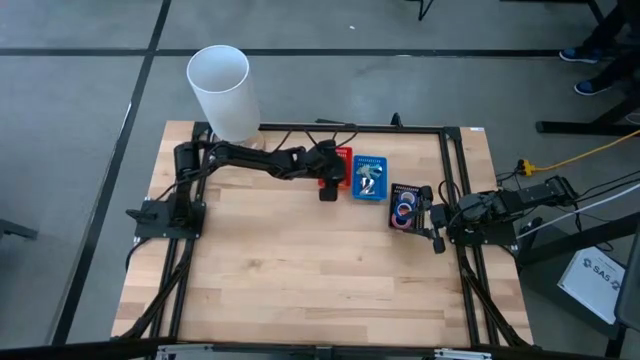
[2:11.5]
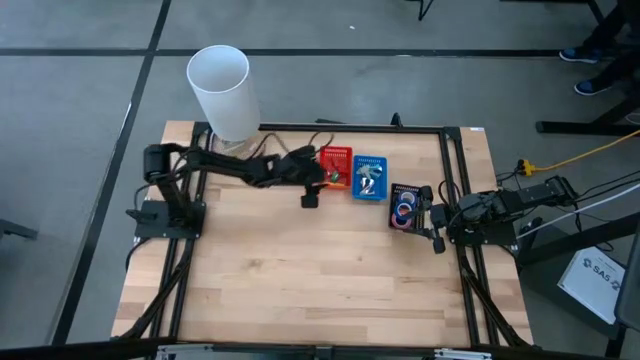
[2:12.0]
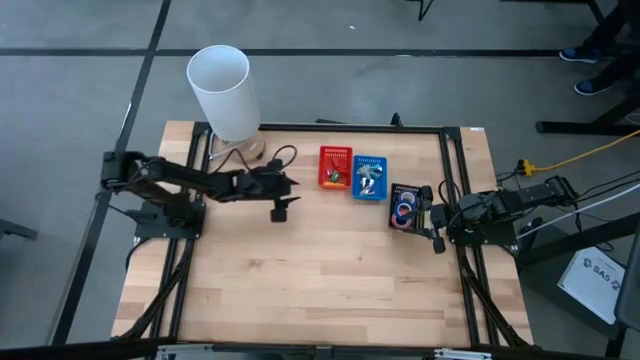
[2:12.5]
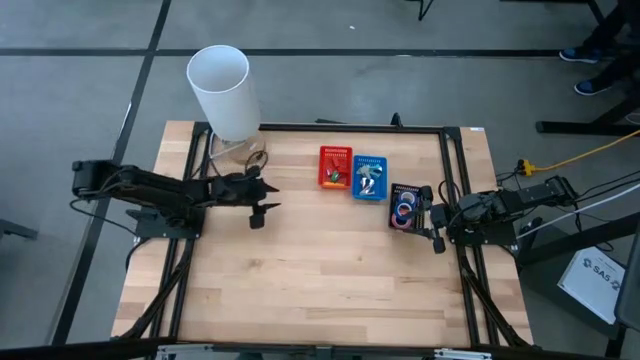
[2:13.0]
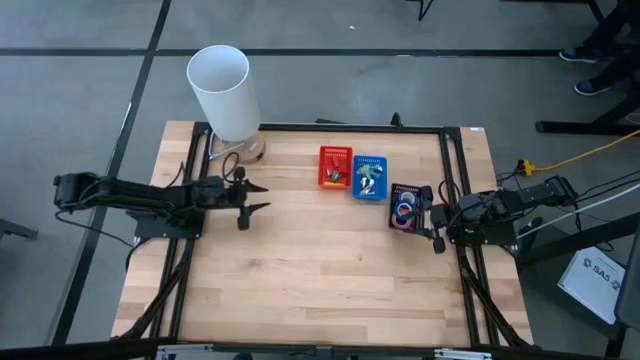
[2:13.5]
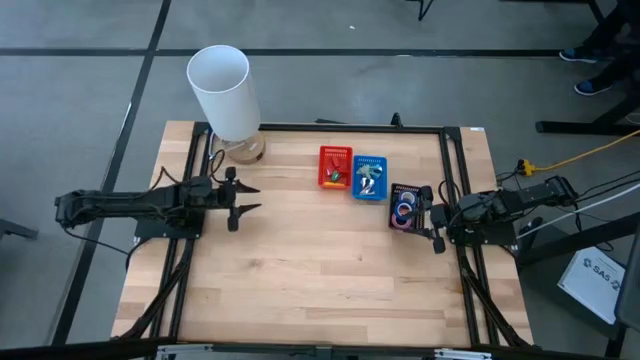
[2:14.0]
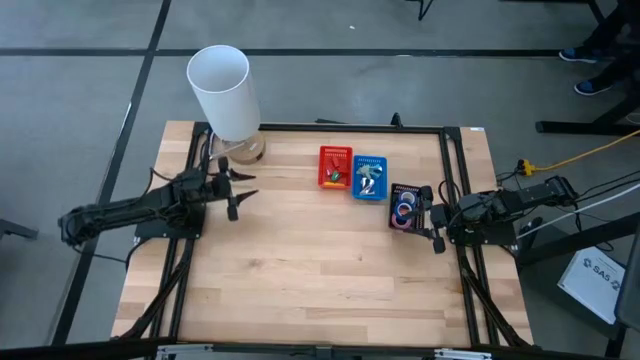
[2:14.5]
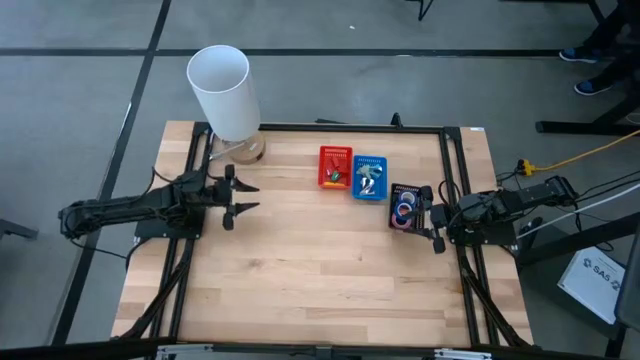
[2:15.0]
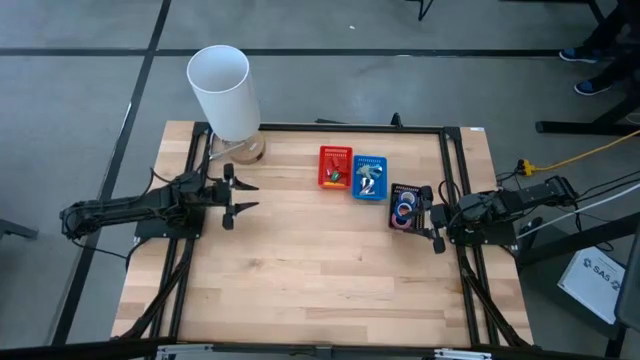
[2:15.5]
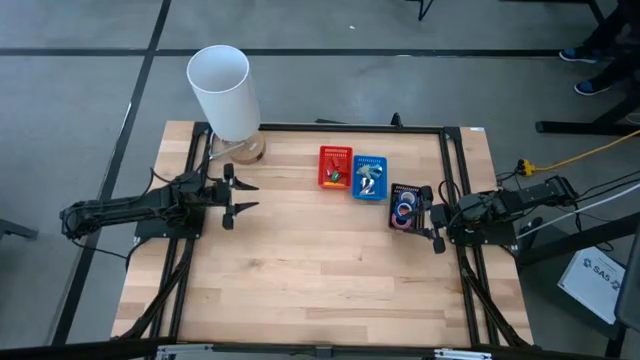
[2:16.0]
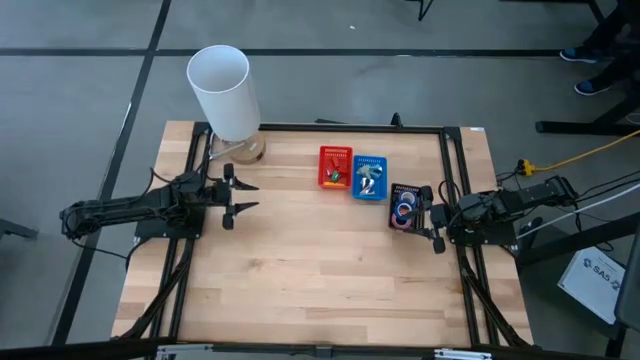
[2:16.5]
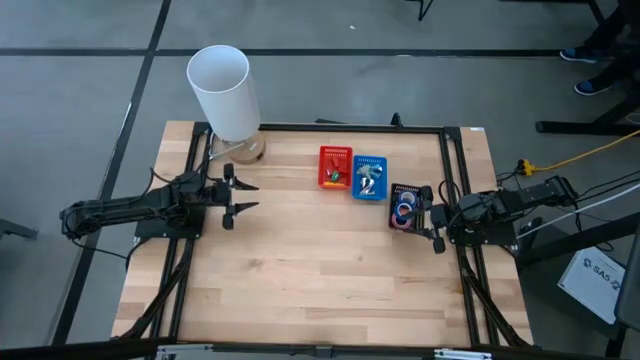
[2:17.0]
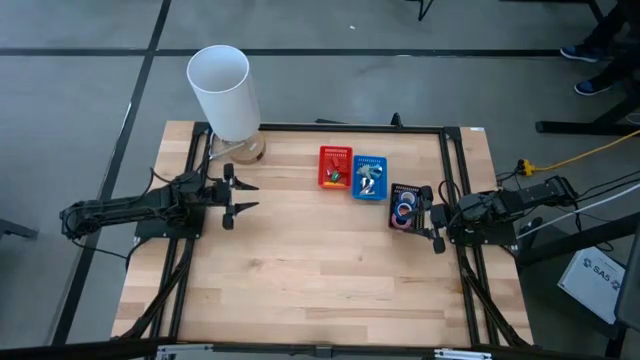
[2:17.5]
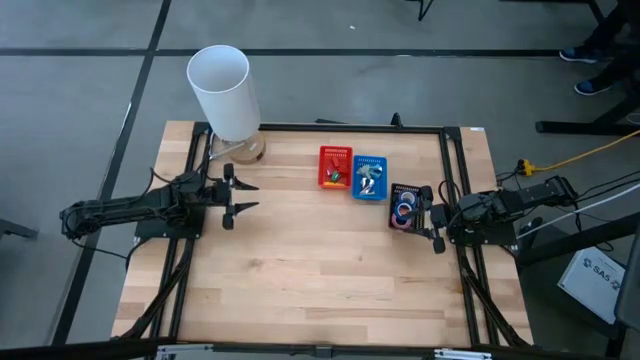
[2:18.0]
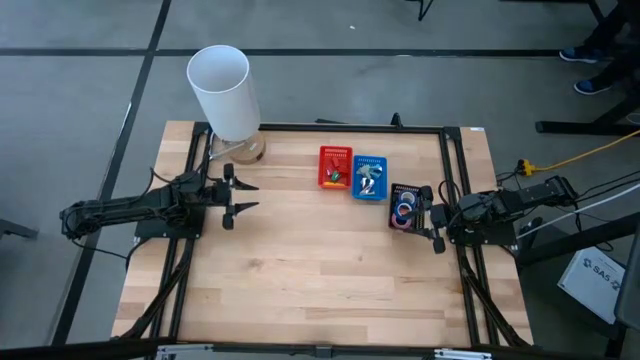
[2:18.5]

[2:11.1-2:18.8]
Task: Pick and place Stapler, Stapler remover, tape
Return to Home Position

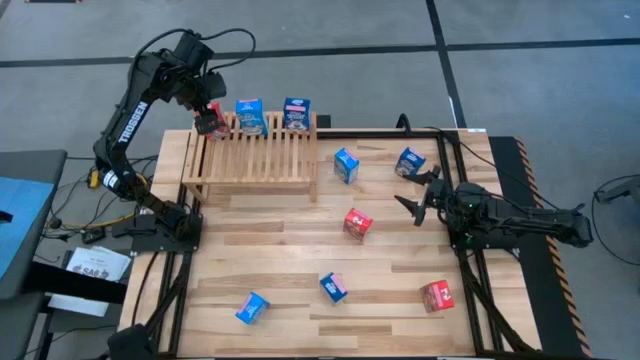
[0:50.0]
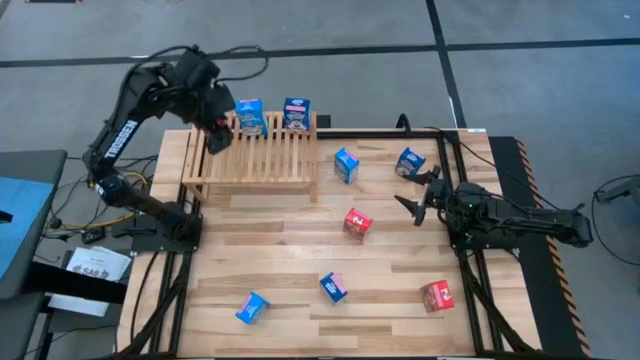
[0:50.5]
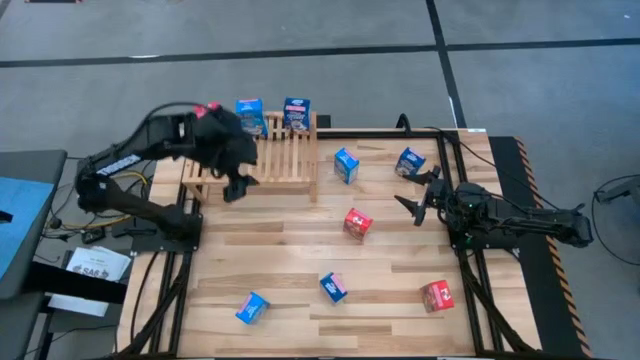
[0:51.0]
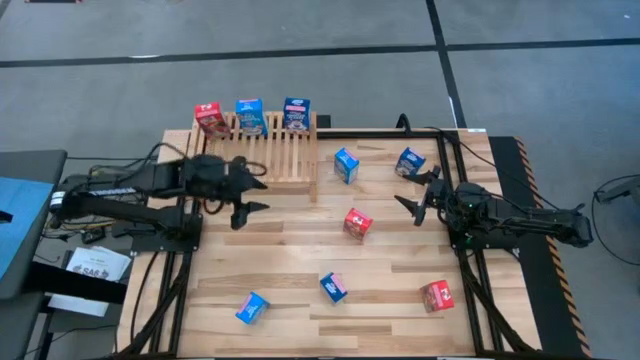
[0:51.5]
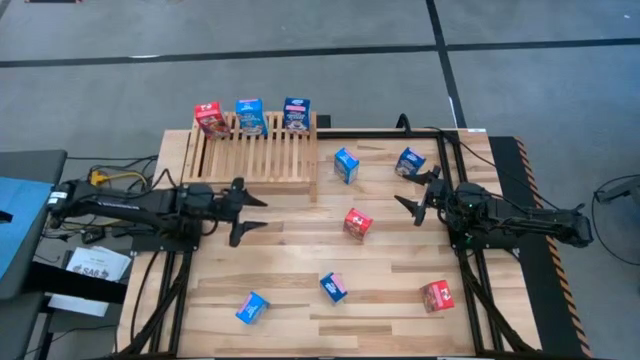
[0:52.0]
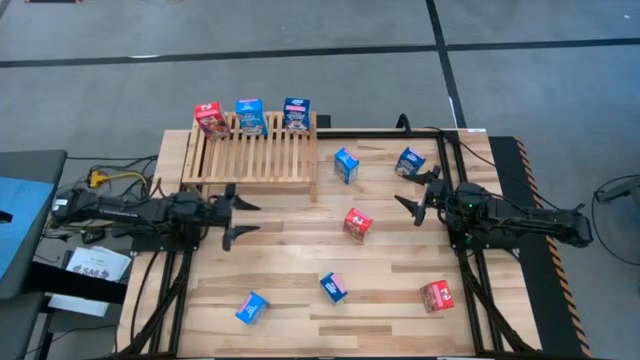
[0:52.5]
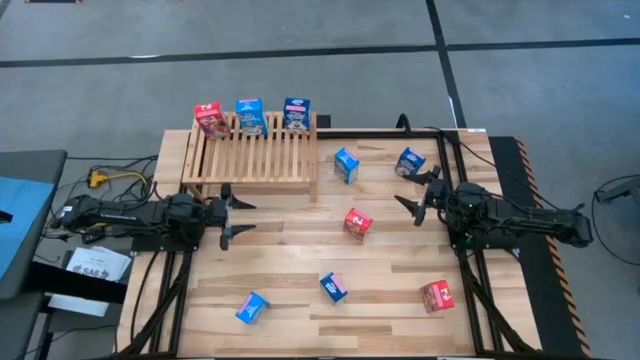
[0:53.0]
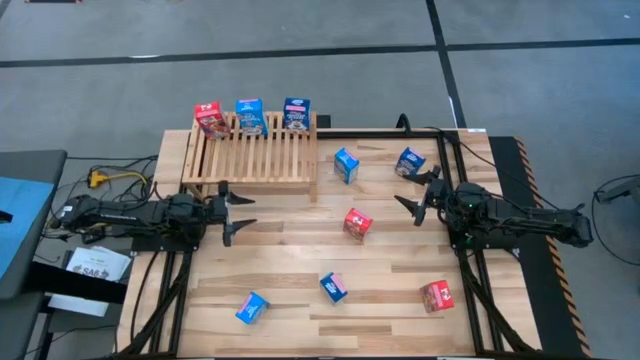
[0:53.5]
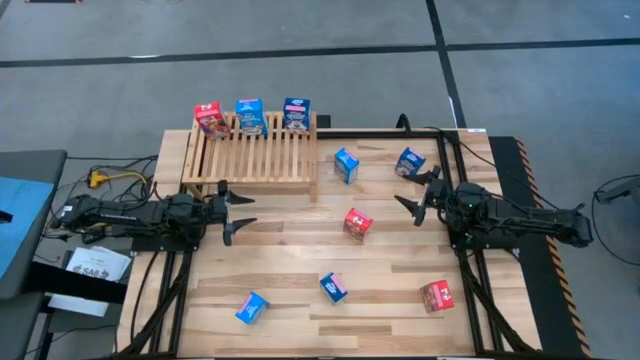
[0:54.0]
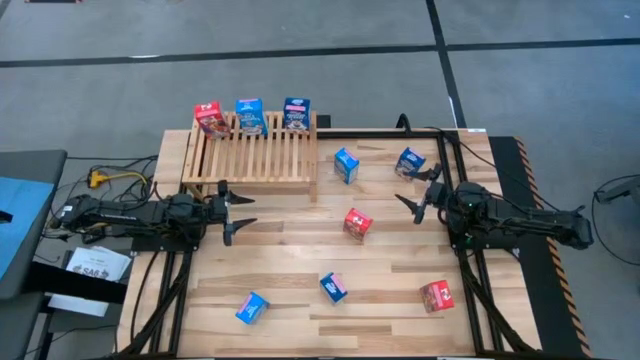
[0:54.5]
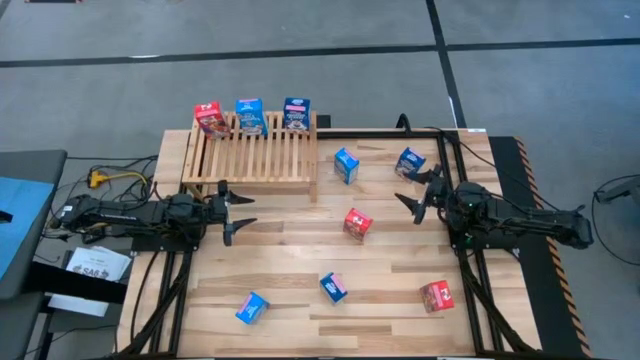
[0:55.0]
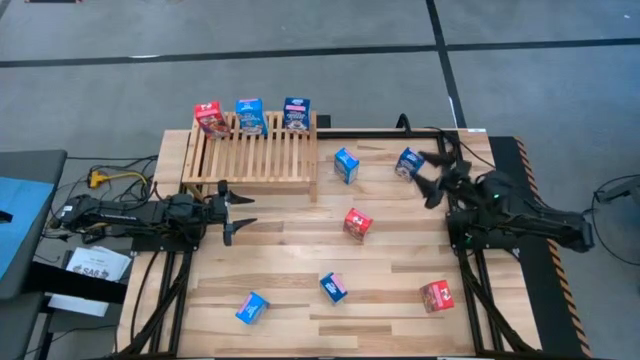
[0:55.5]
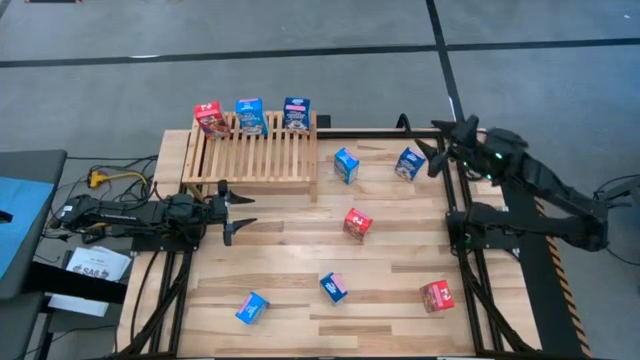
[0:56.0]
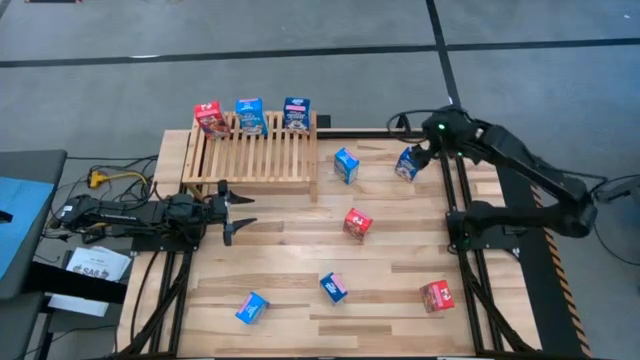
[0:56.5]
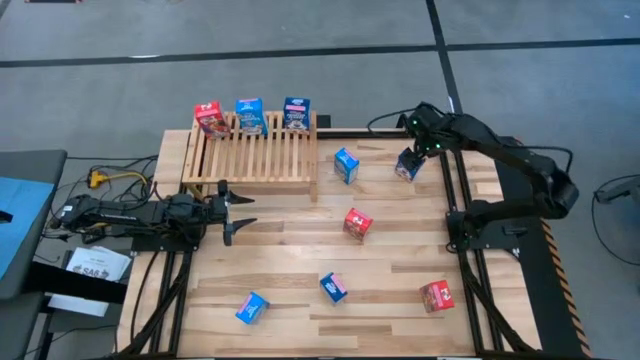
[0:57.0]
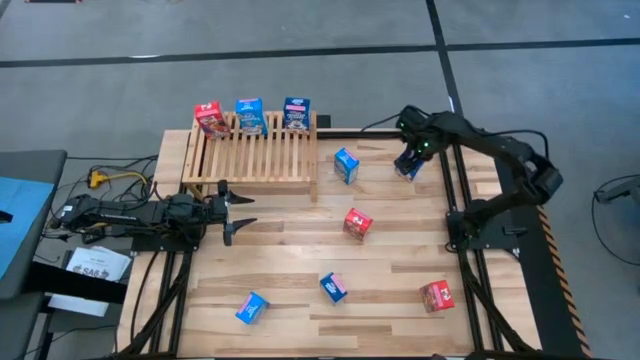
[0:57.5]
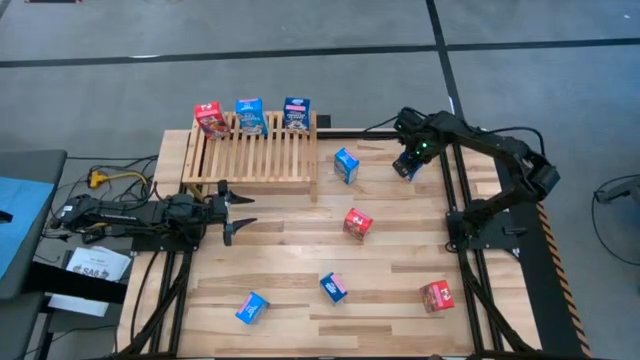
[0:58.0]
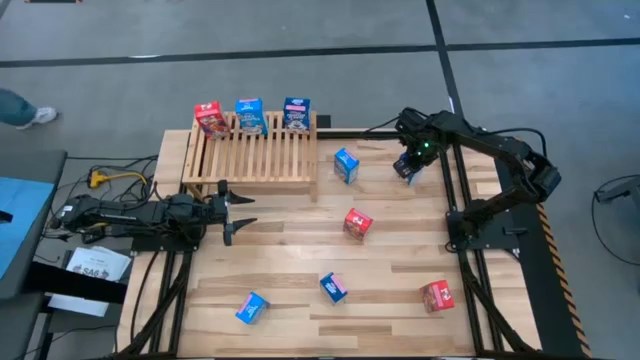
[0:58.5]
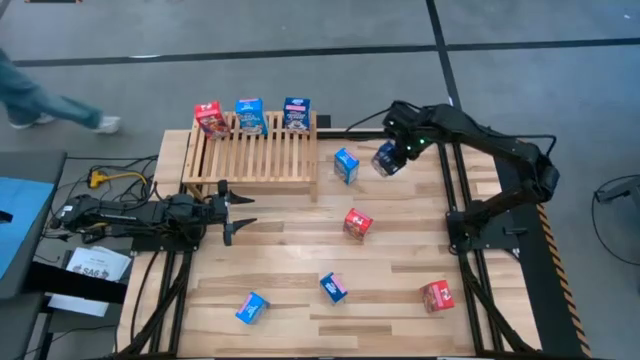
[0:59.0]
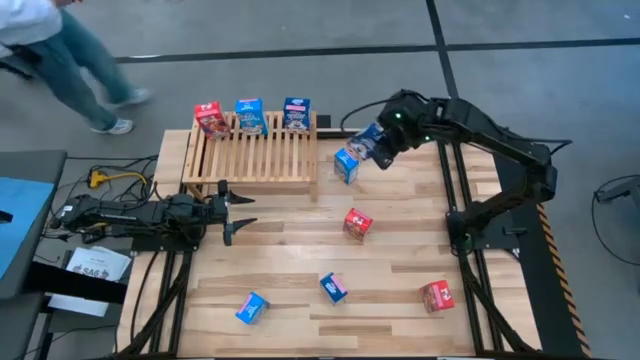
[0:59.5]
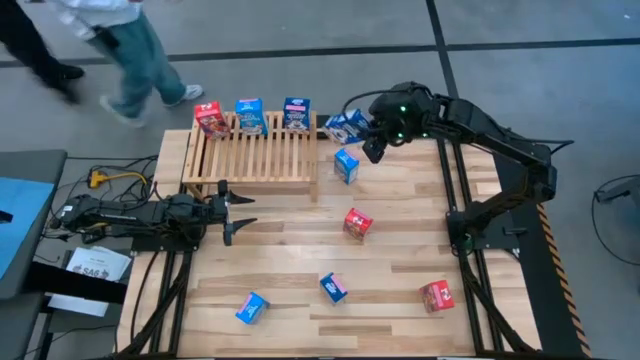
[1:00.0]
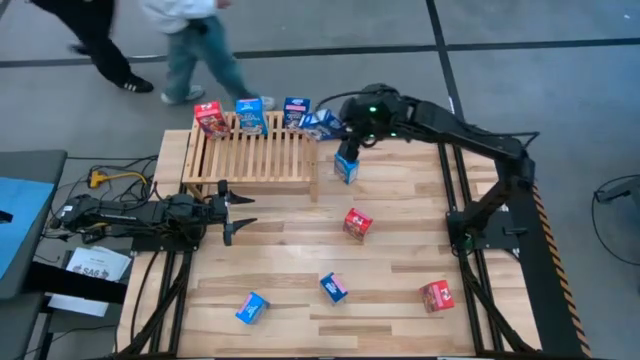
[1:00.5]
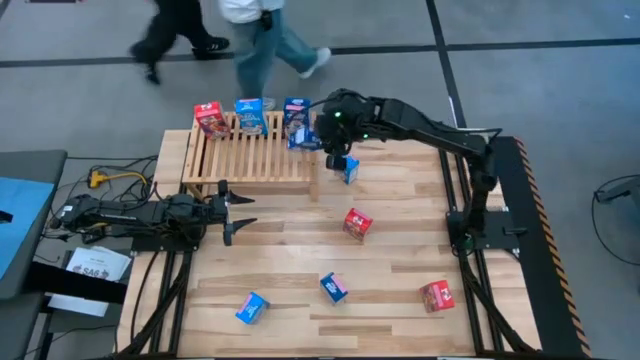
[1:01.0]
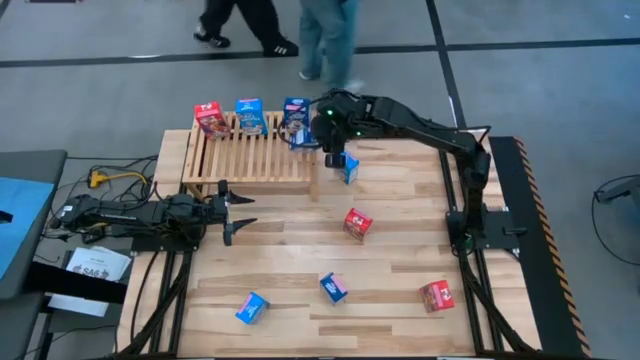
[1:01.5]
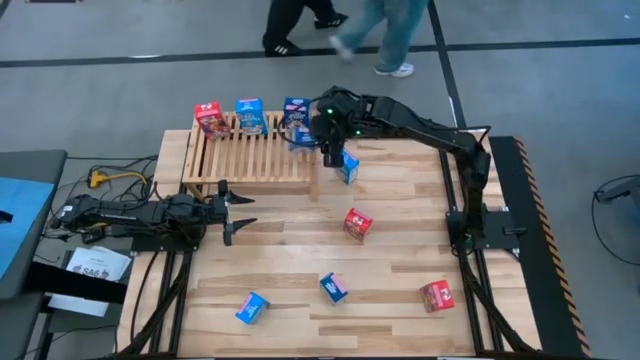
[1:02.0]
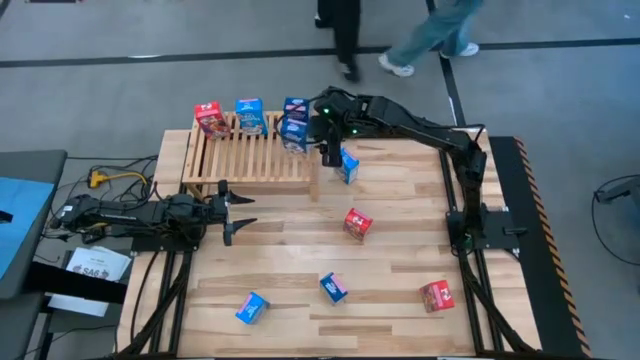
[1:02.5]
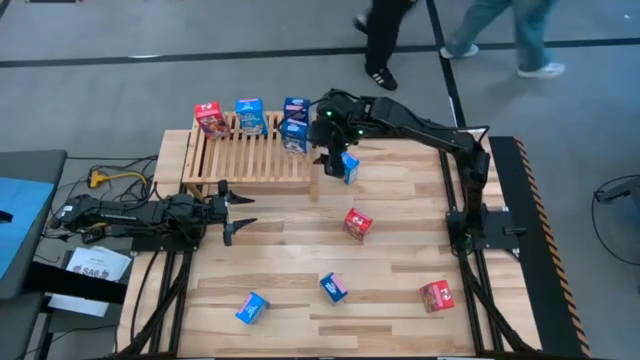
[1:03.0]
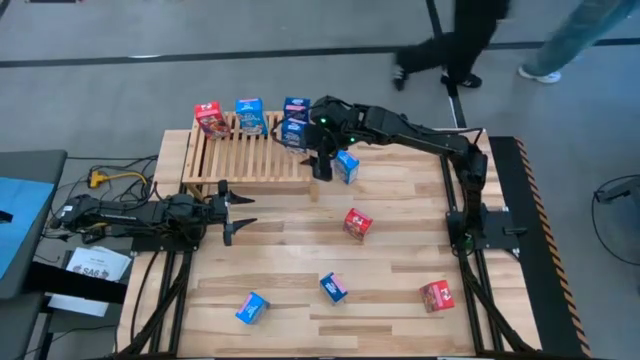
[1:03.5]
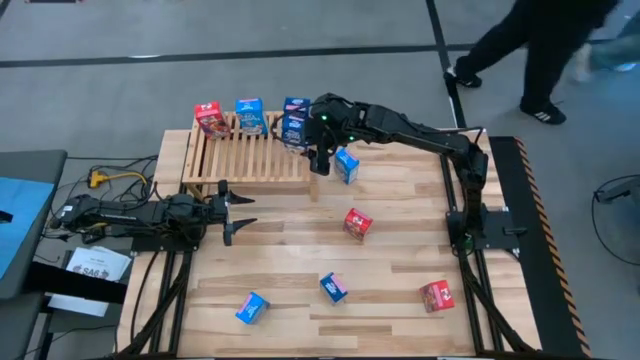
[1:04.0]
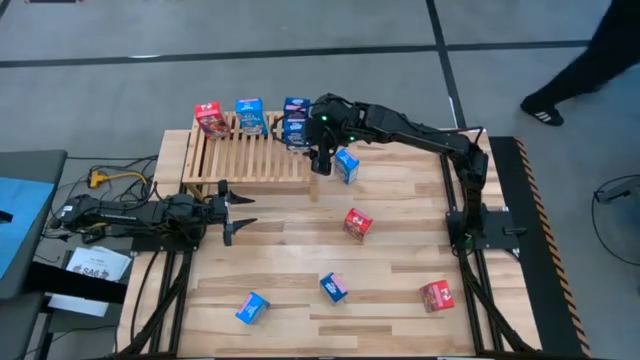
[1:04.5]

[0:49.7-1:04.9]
Task: Stack cereal on shelf
Put the top dark blue cereal box the aligned with the other dark blue cereal box on the shelf
